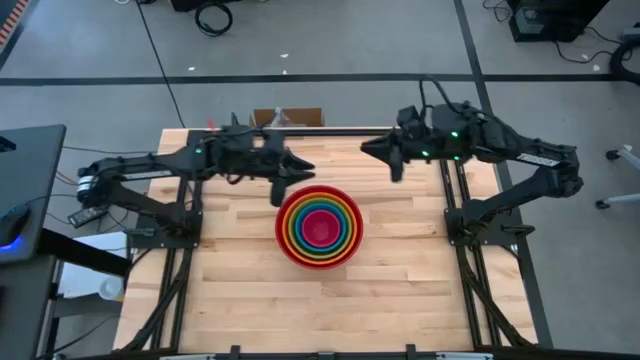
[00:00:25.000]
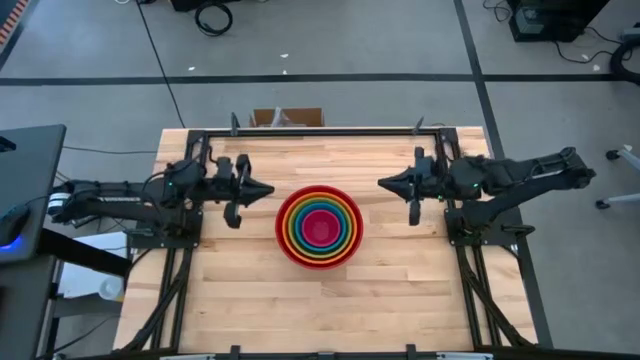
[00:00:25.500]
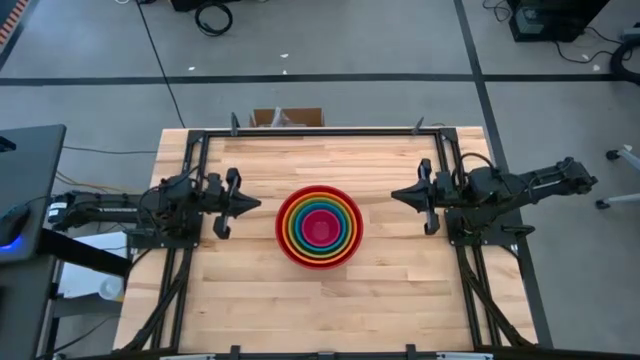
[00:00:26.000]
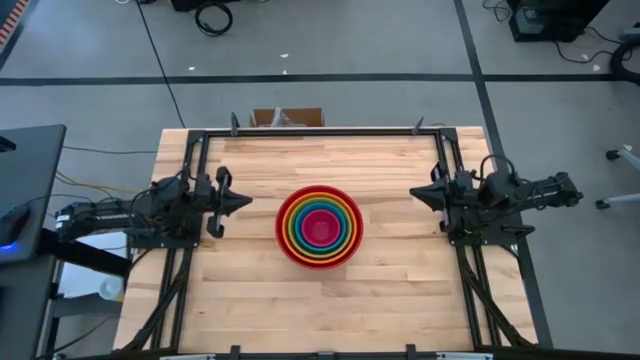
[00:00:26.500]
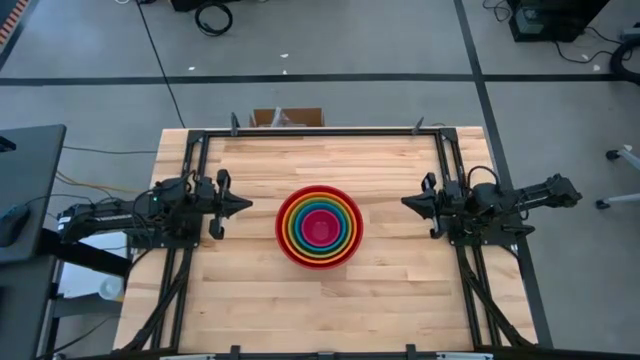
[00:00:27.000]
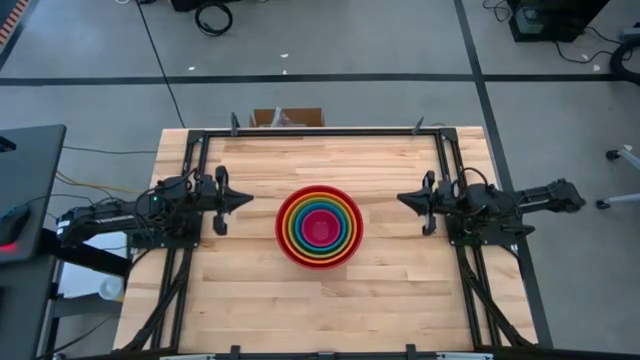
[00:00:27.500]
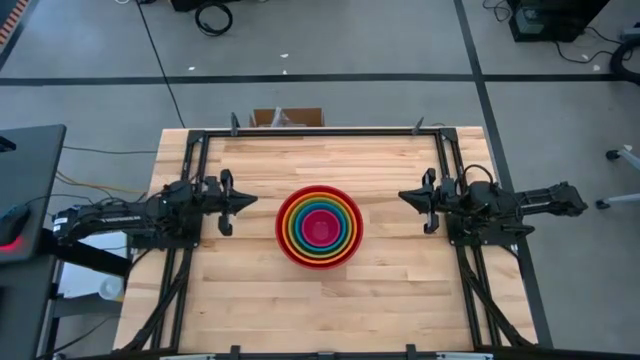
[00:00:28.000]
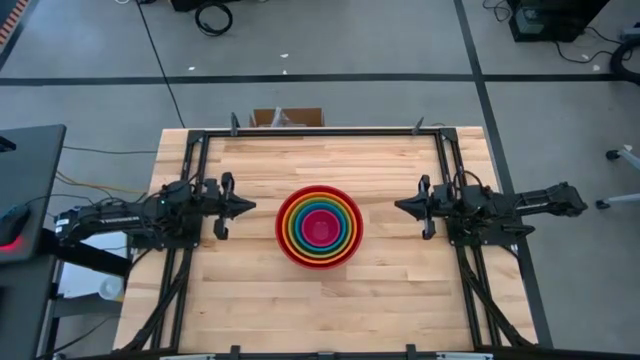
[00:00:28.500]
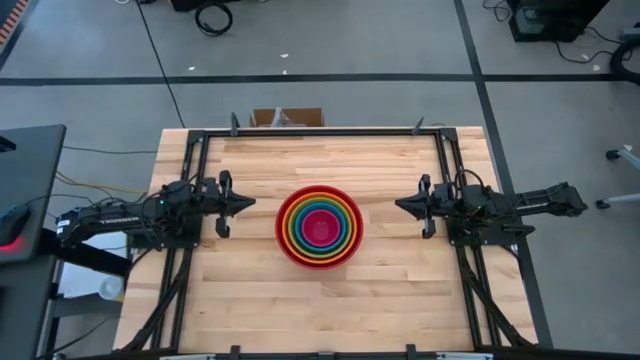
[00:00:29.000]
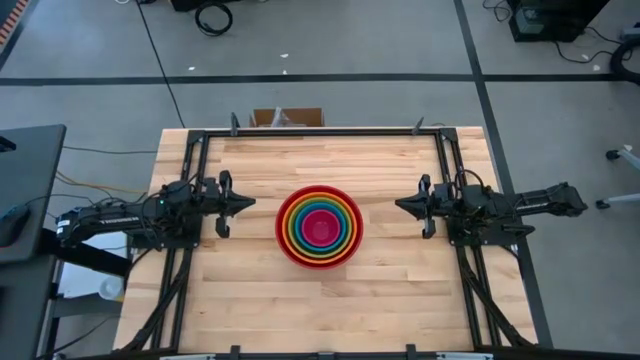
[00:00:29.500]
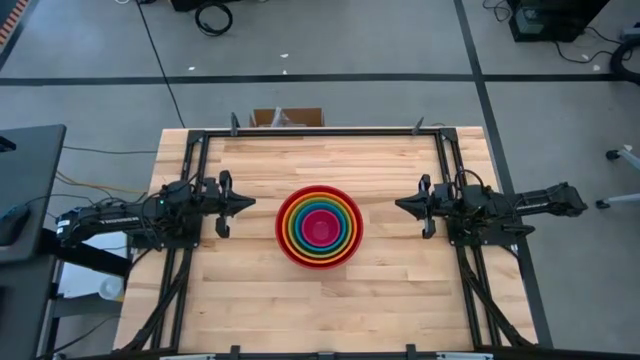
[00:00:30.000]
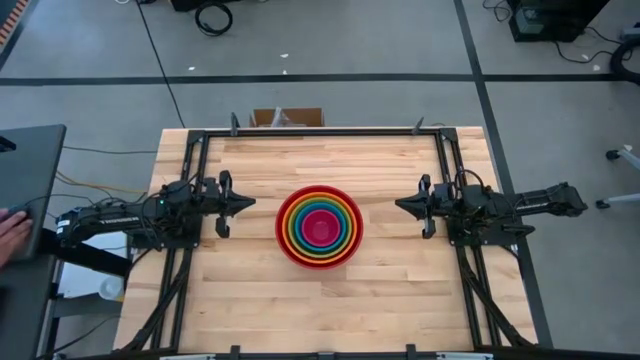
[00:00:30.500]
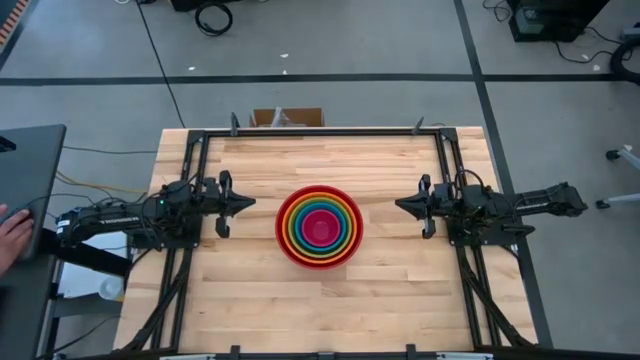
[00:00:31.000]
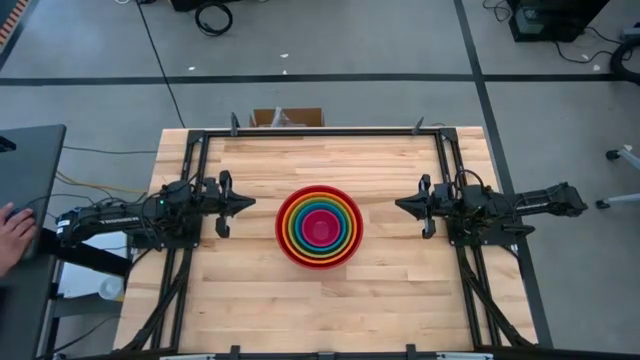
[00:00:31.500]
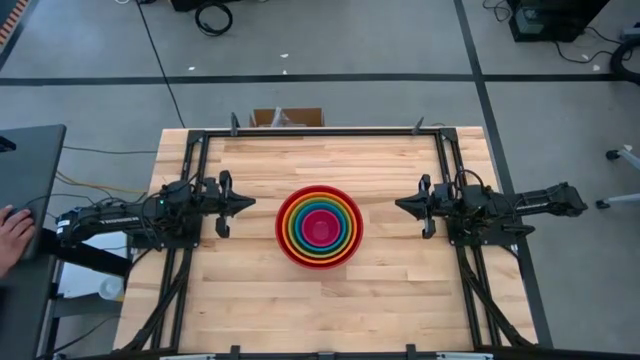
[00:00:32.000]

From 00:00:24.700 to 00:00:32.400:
Return to Home Position

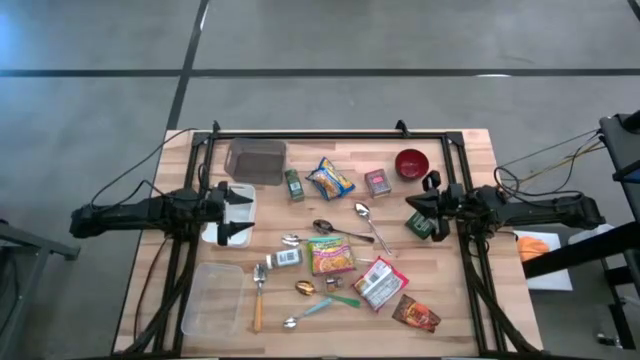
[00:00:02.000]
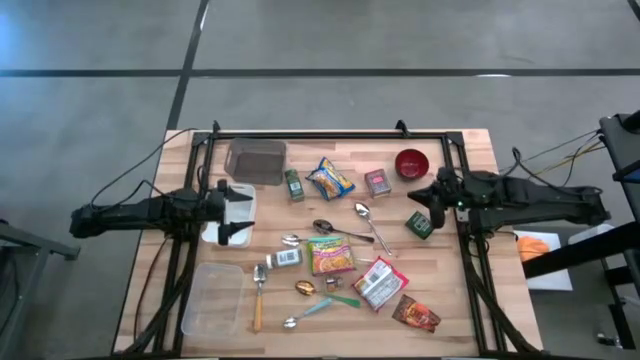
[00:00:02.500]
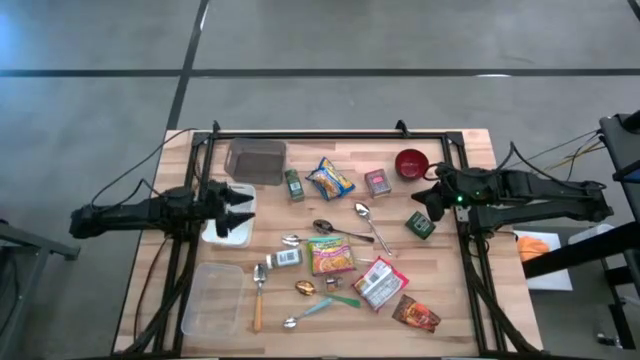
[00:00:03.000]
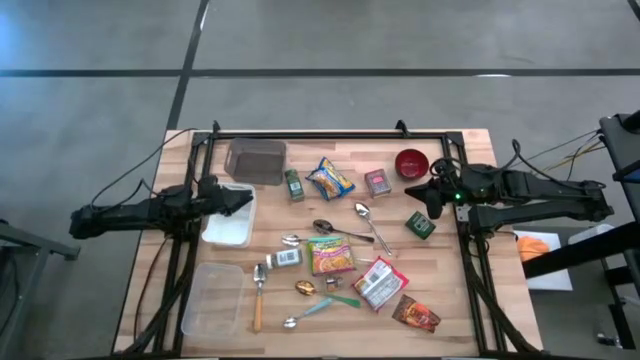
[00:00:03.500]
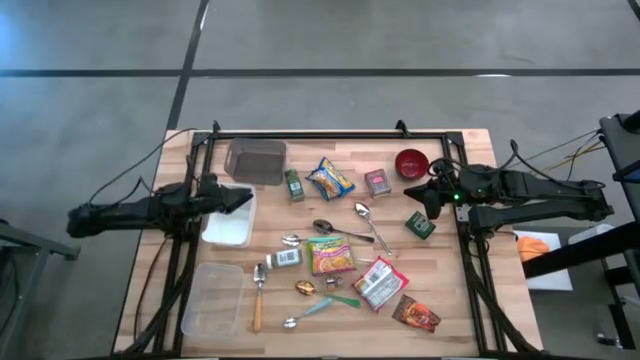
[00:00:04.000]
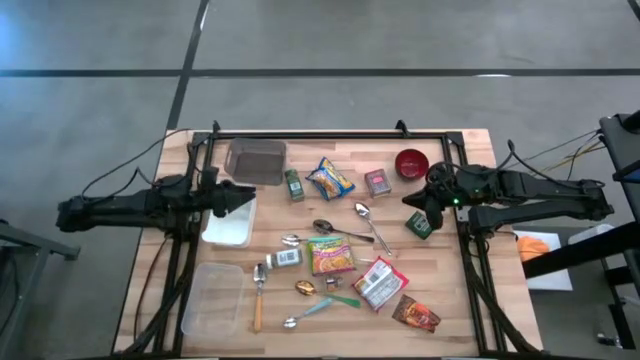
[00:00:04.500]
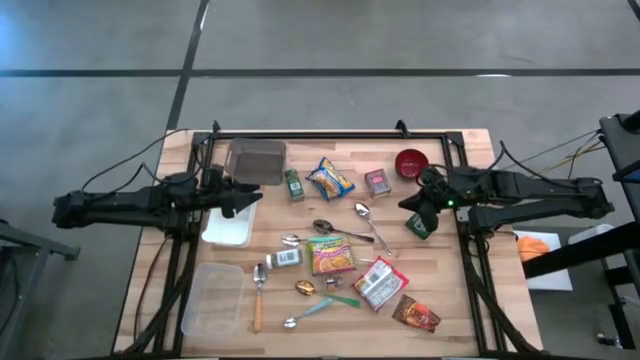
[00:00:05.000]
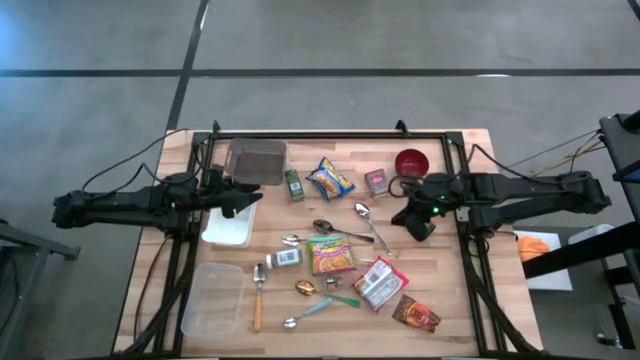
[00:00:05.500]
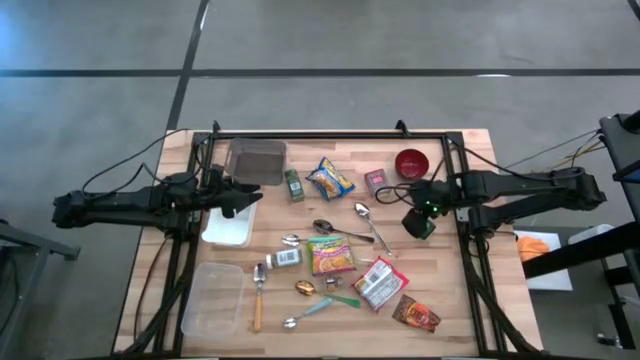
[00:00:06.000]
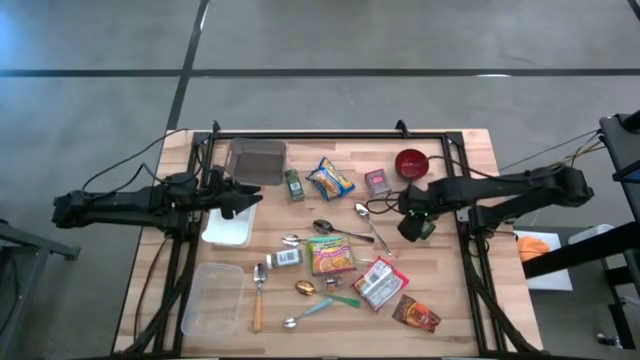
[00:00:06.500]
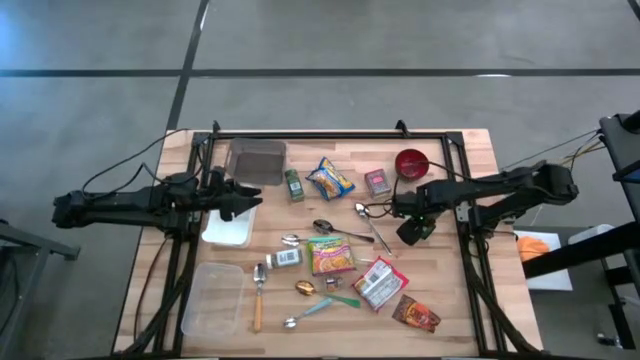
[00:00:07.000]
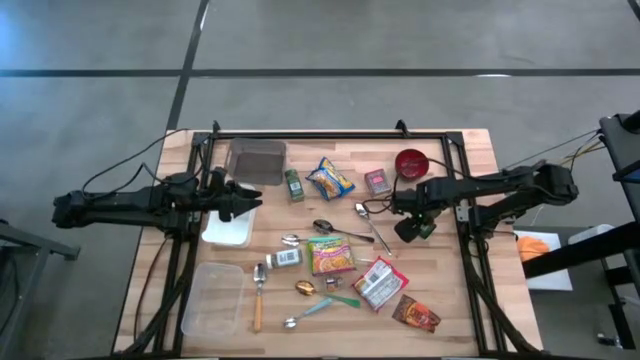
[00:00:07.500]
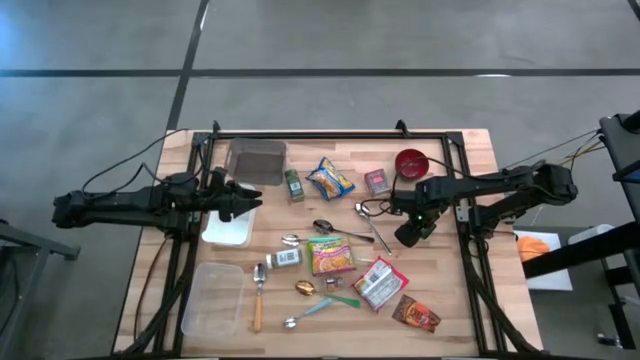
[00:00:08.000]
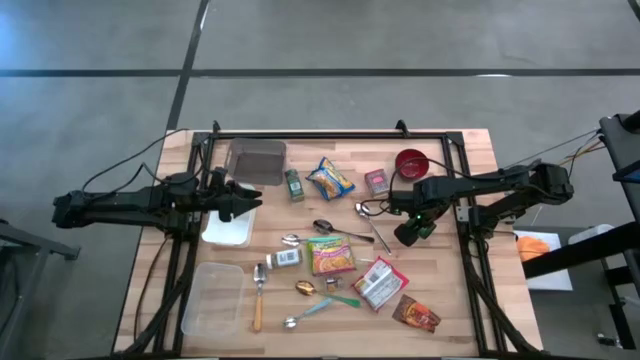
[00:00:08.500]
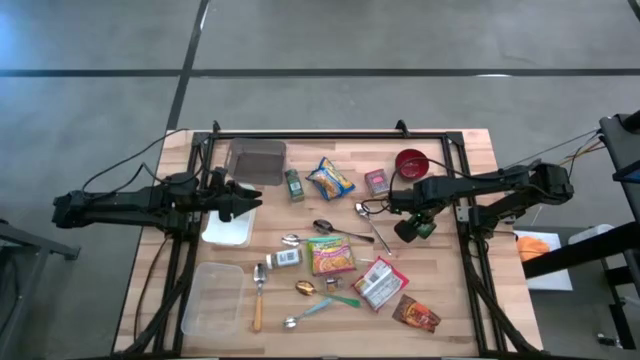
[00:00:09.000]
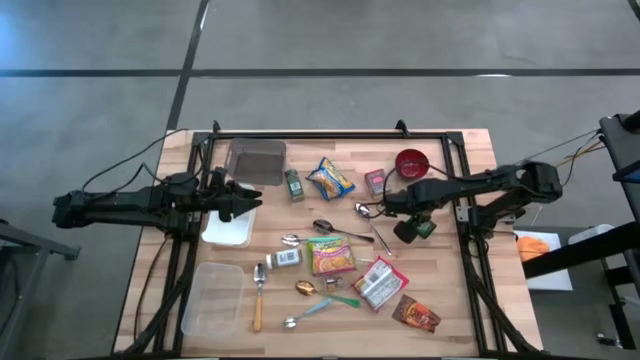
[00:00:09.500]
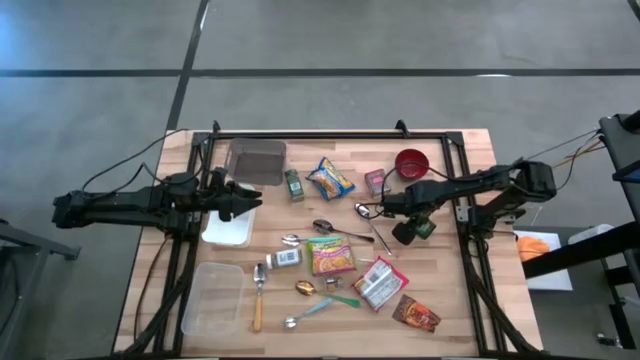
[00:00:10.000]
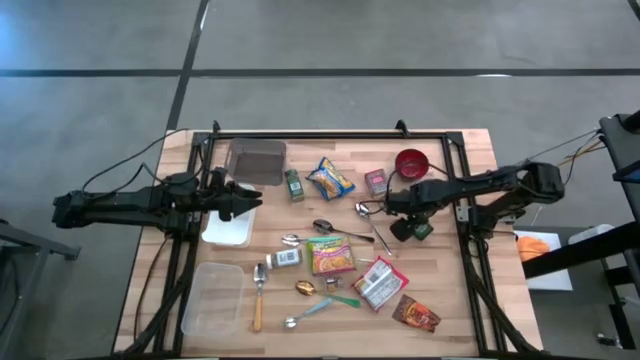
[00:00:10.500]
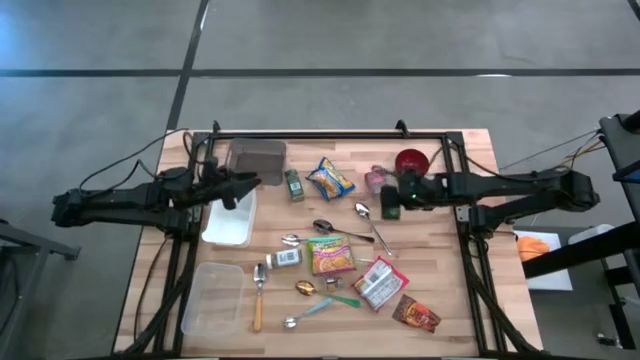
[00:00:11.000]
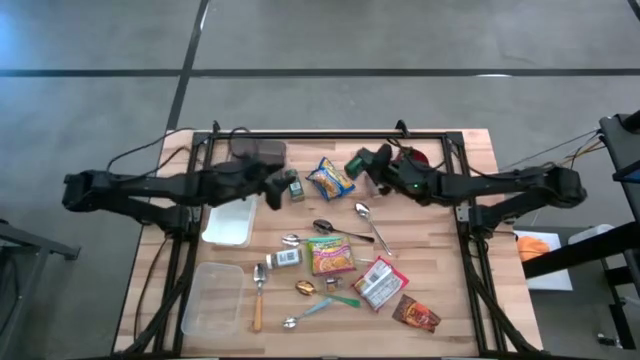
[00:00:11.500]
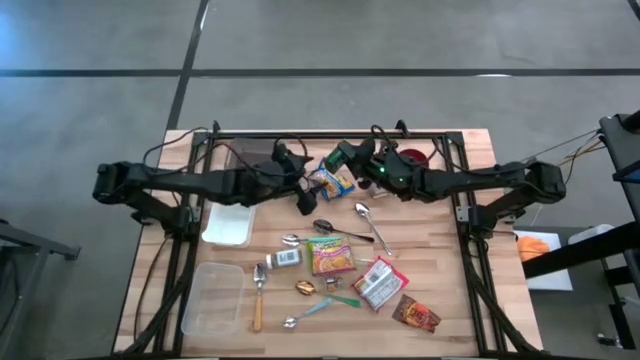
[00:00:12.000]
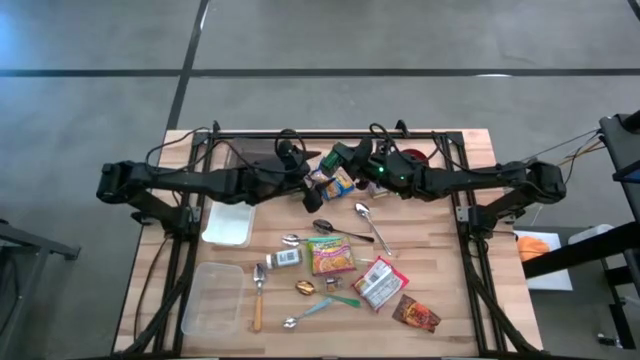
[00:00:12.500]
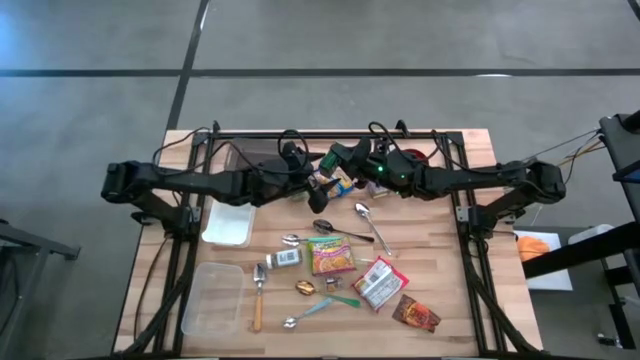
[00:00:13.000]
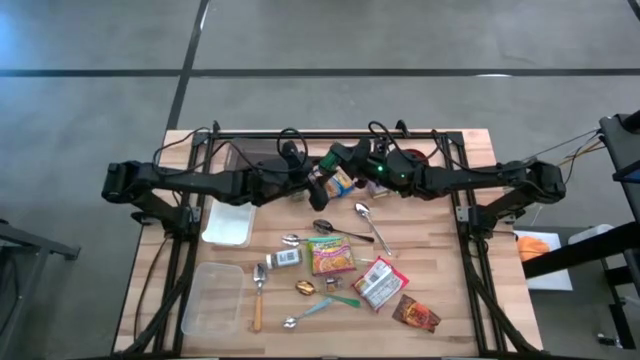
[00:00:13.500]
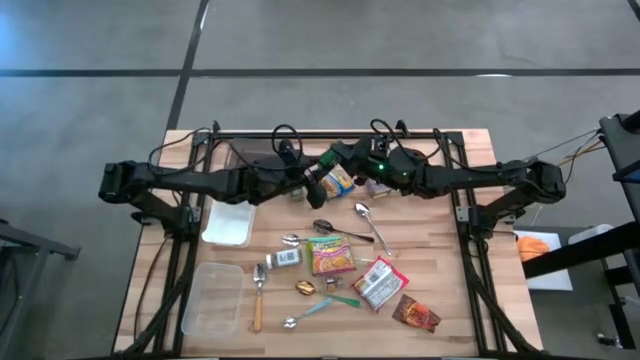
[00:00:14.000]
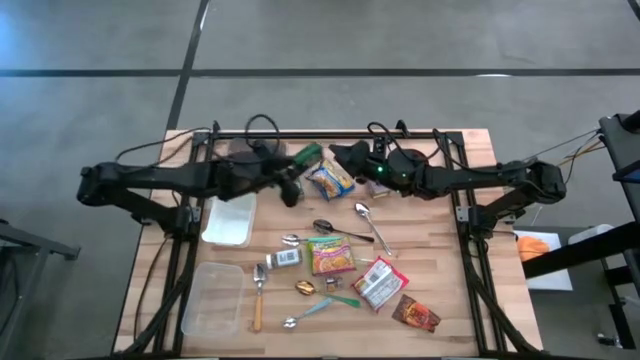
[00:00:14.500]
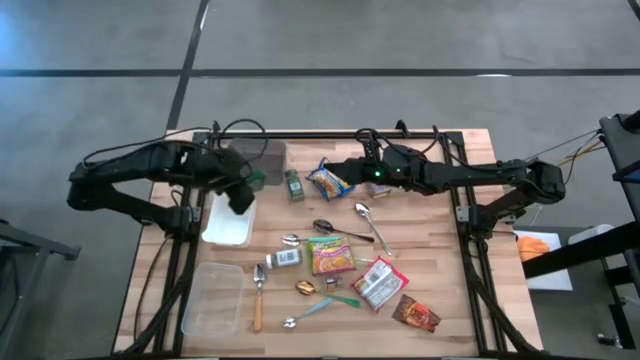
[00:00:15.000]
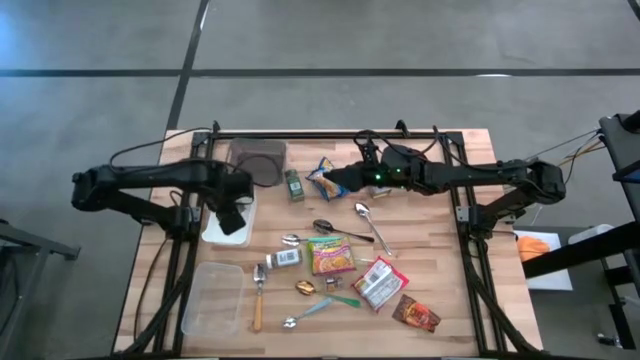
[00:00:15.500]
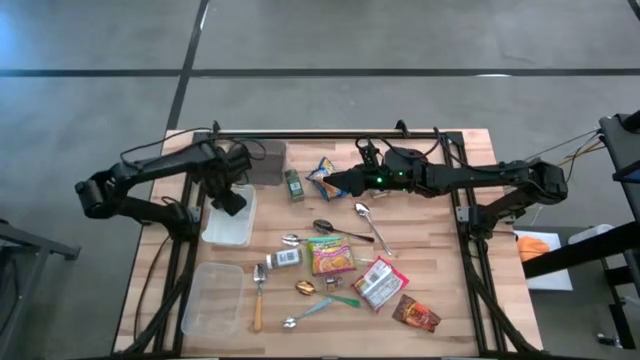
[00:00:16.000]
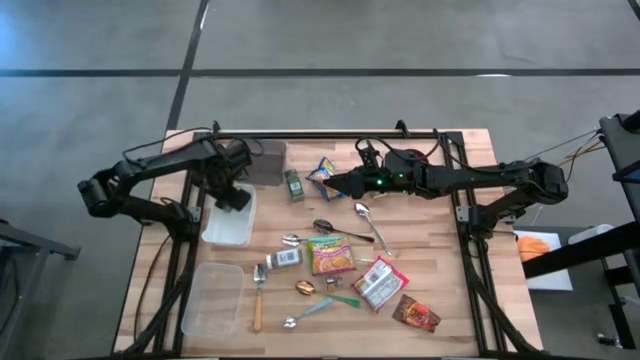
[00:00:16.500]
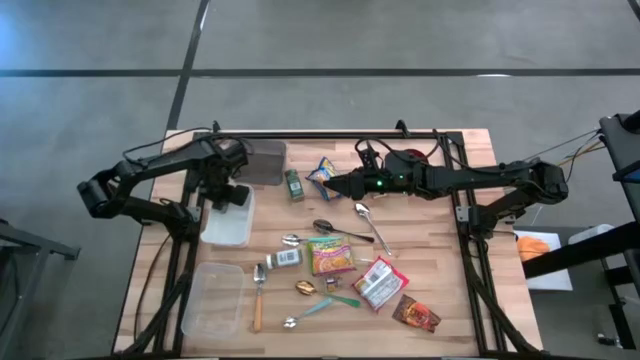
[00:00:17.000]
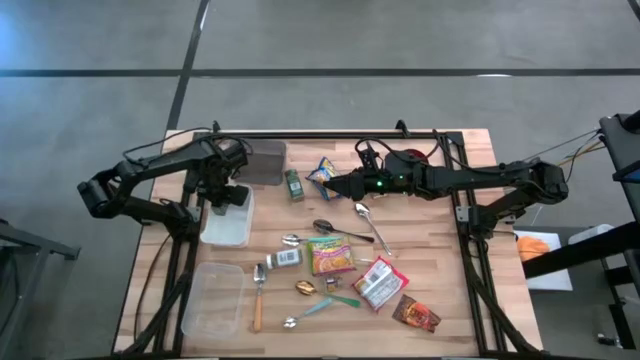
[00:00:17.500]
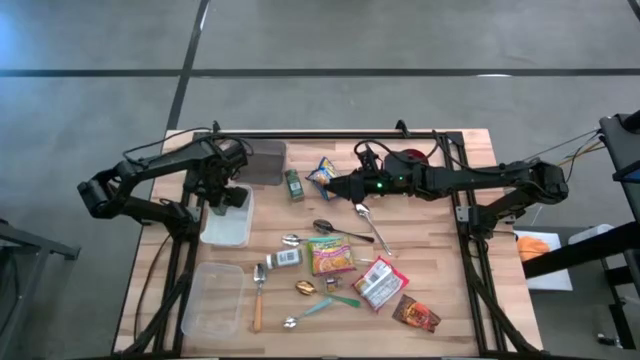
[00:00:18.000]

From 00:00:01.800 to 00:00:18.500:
Put the black seasoning can into the white bin
